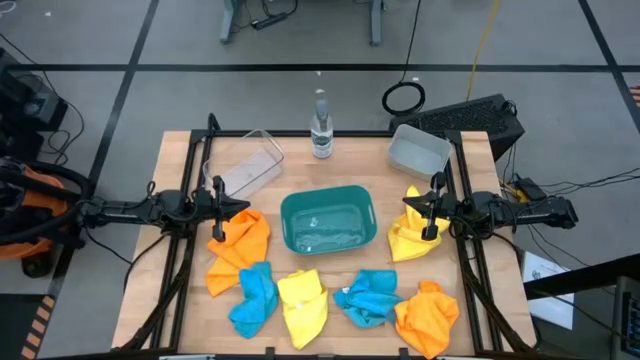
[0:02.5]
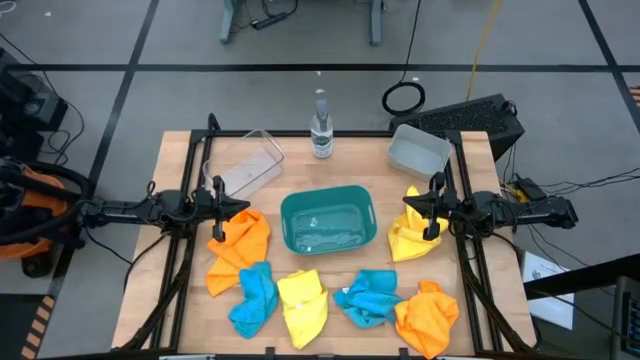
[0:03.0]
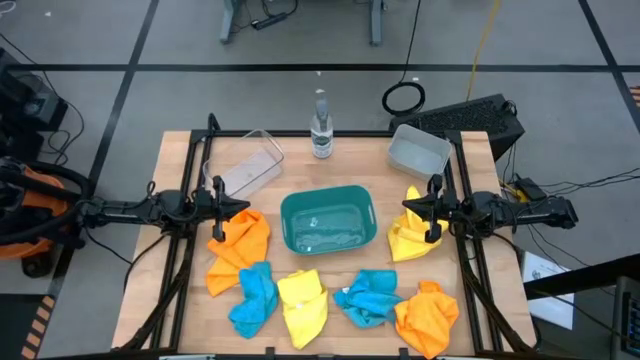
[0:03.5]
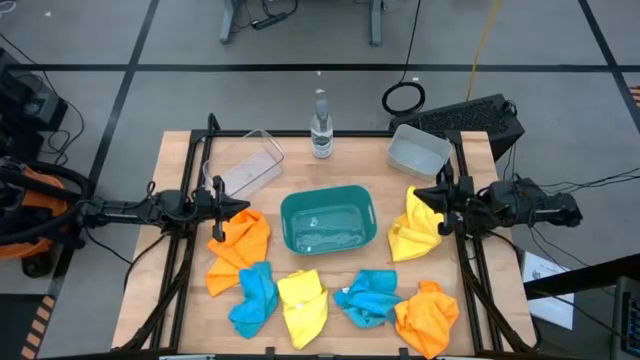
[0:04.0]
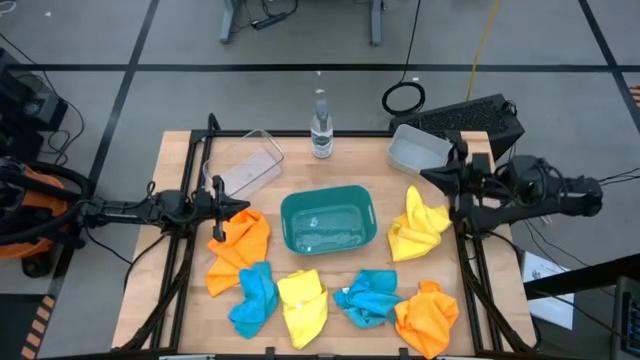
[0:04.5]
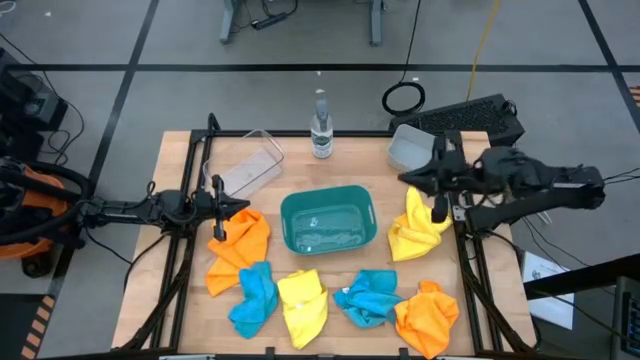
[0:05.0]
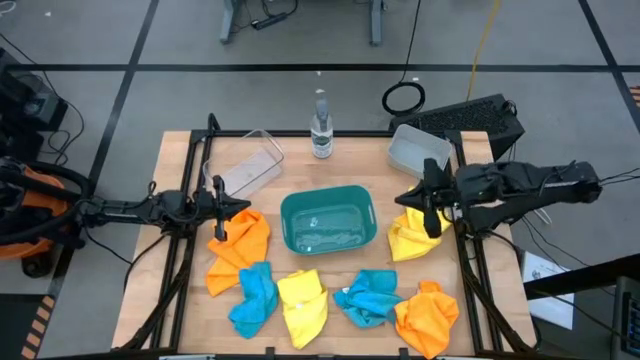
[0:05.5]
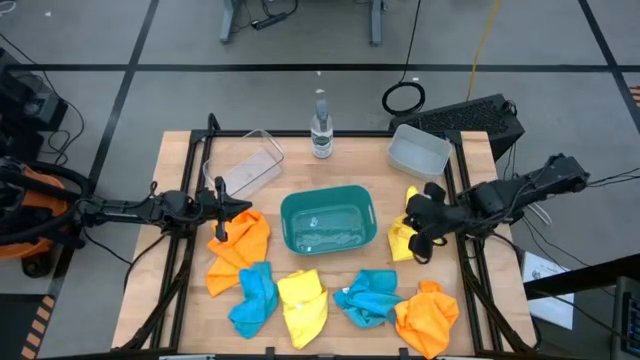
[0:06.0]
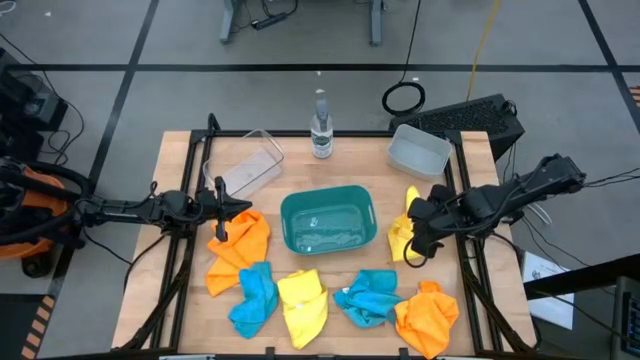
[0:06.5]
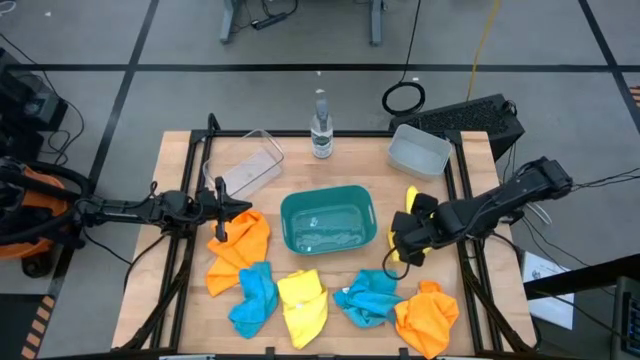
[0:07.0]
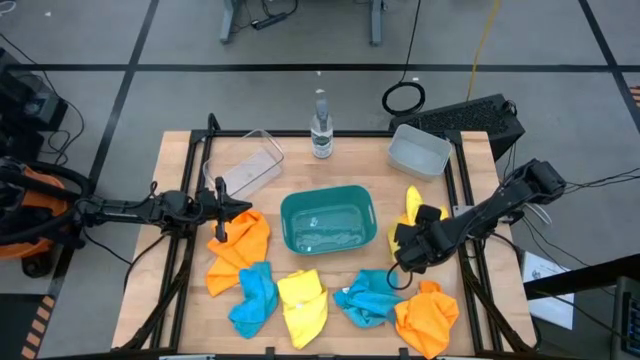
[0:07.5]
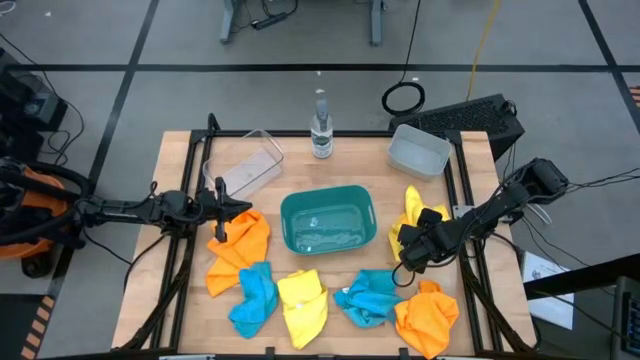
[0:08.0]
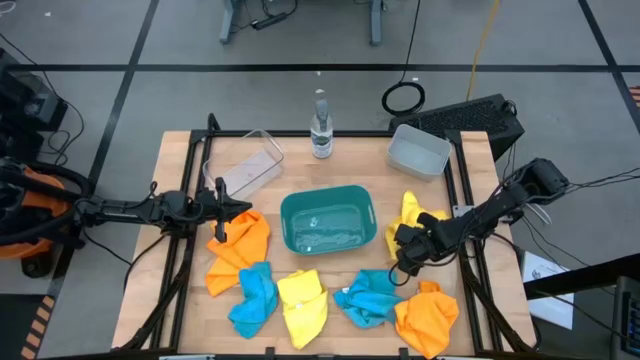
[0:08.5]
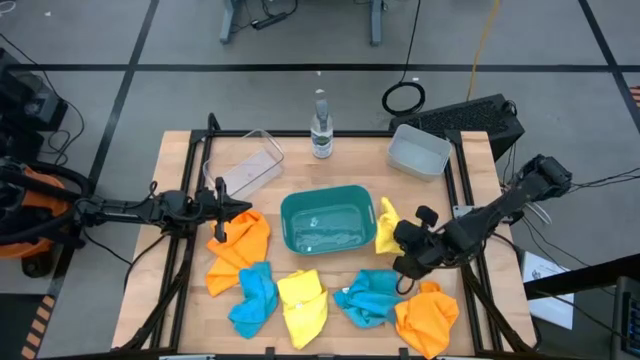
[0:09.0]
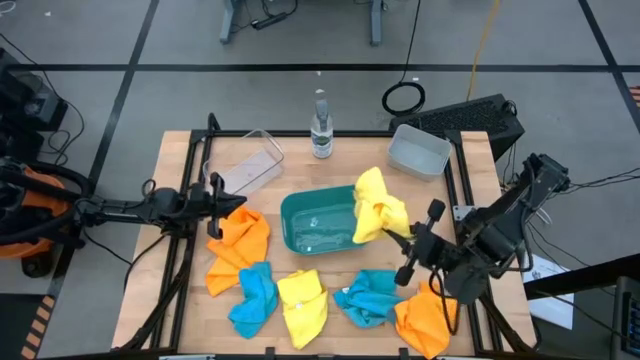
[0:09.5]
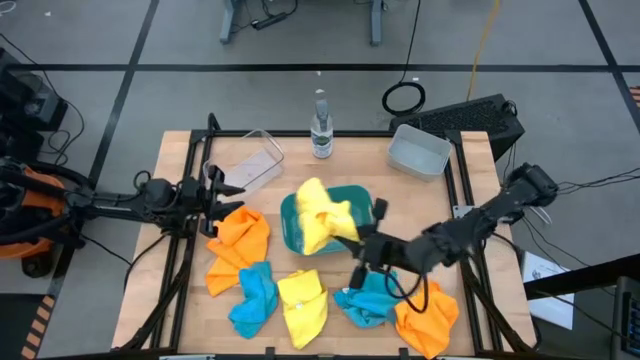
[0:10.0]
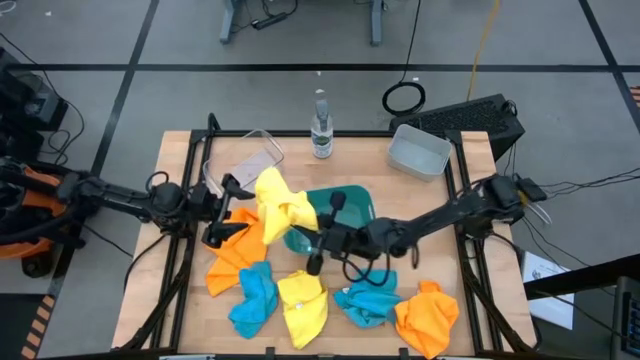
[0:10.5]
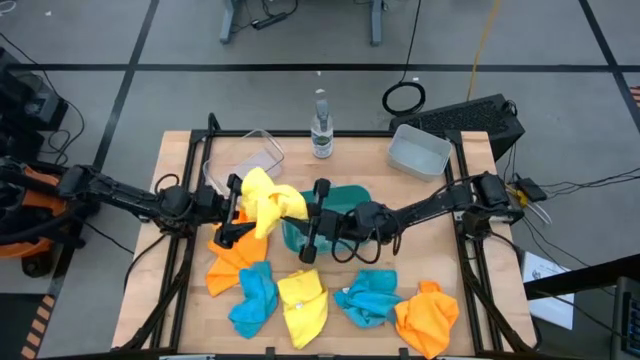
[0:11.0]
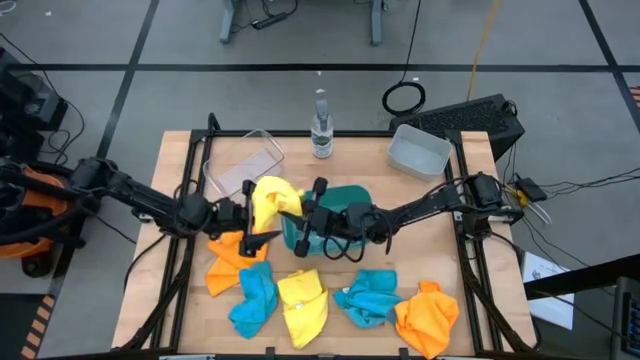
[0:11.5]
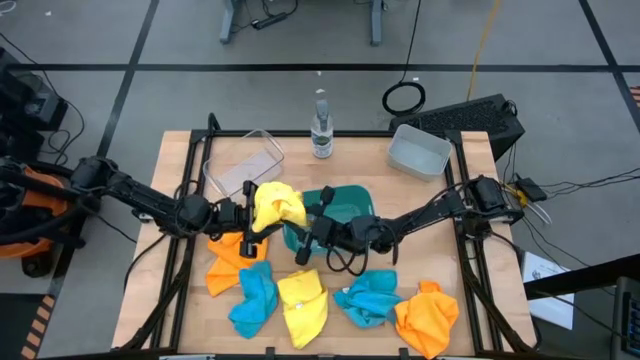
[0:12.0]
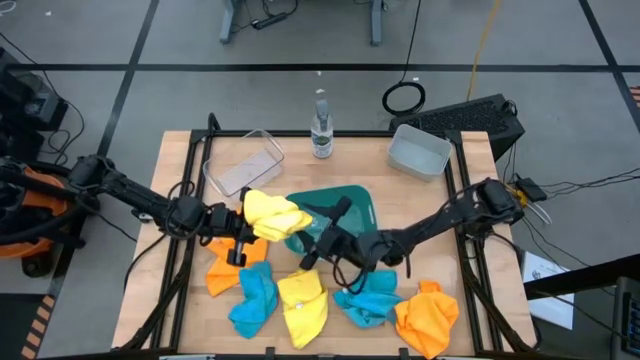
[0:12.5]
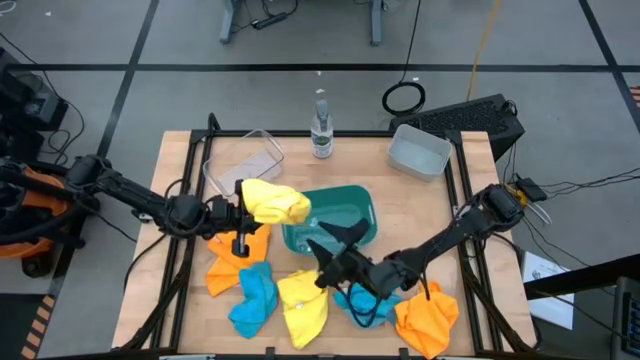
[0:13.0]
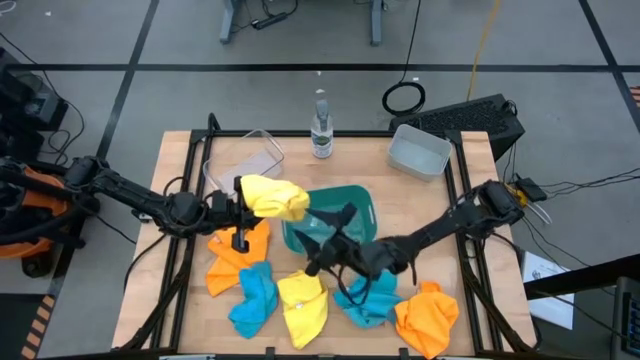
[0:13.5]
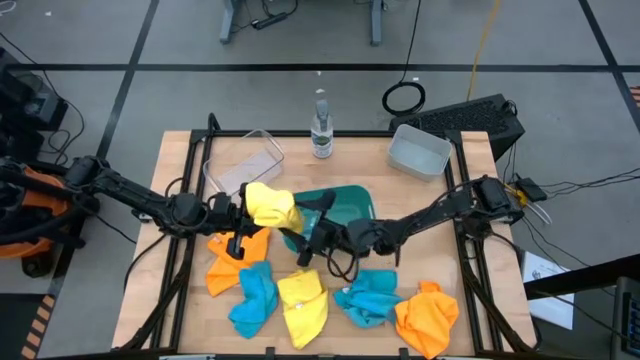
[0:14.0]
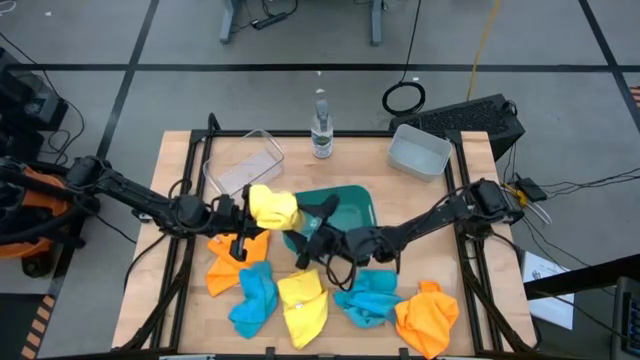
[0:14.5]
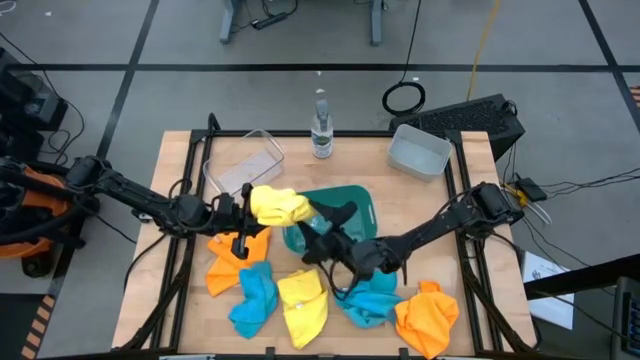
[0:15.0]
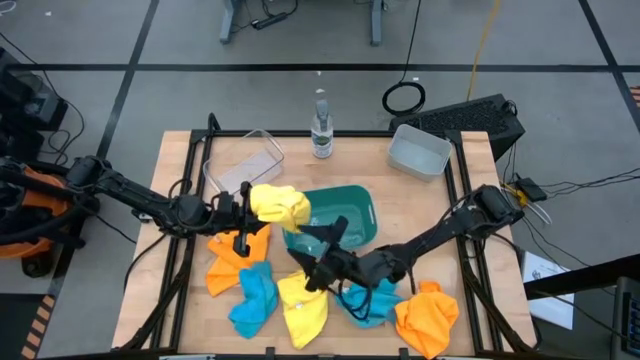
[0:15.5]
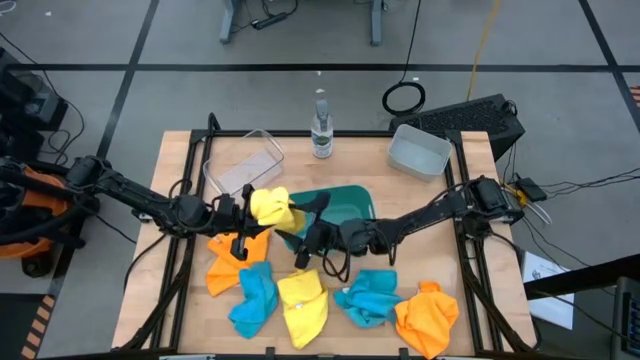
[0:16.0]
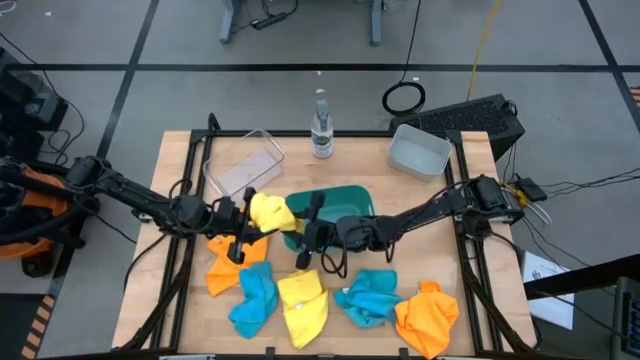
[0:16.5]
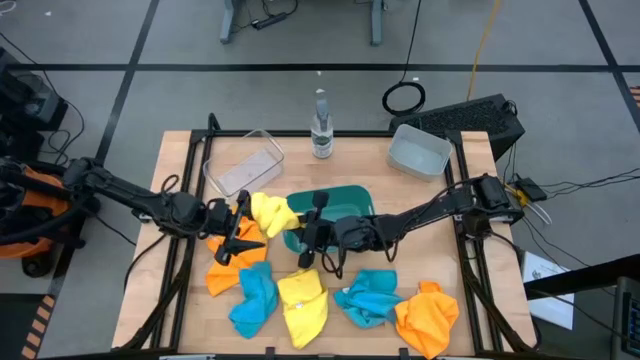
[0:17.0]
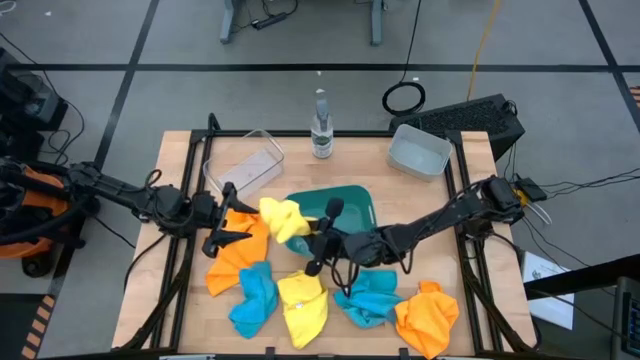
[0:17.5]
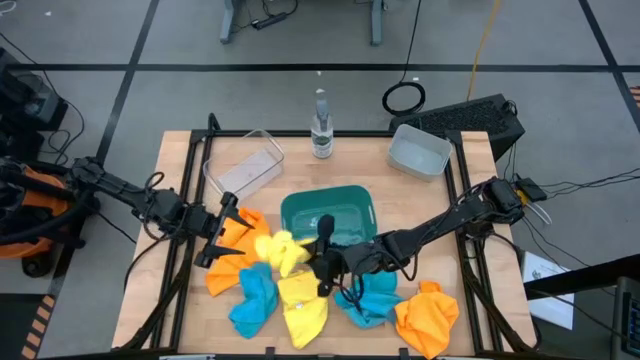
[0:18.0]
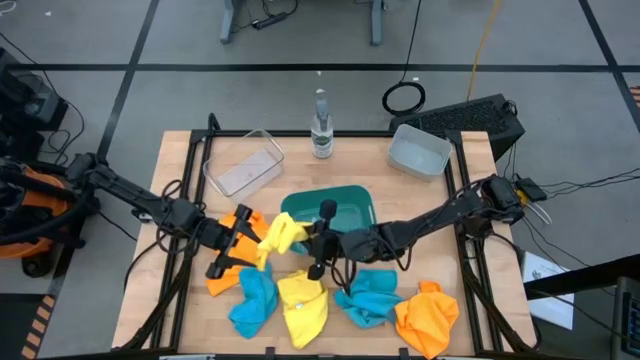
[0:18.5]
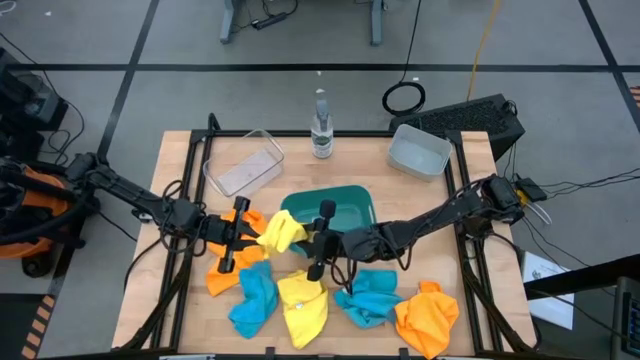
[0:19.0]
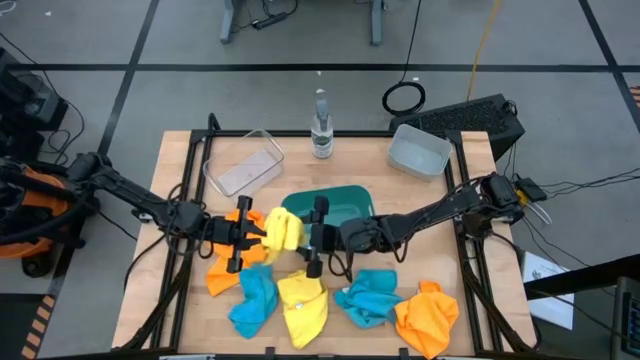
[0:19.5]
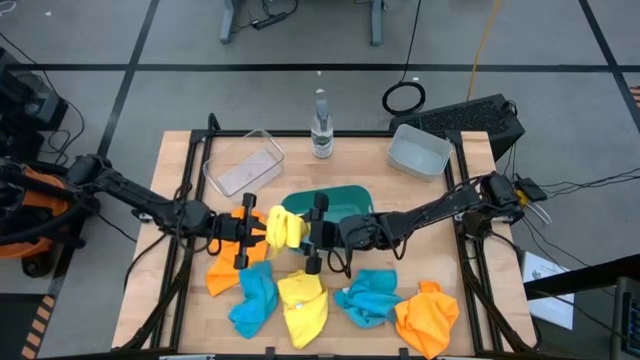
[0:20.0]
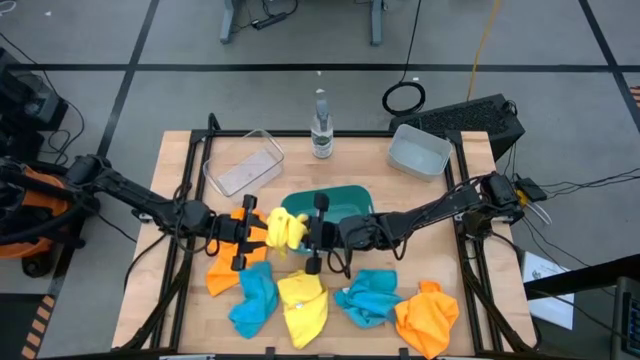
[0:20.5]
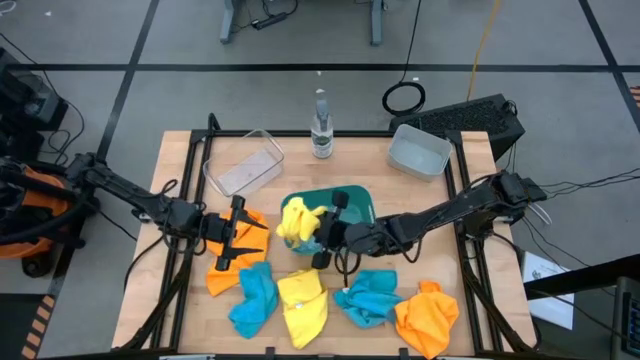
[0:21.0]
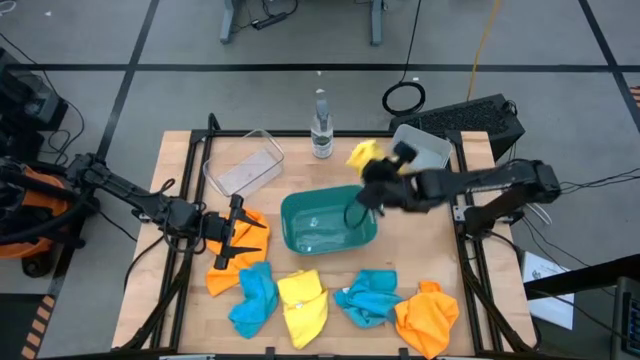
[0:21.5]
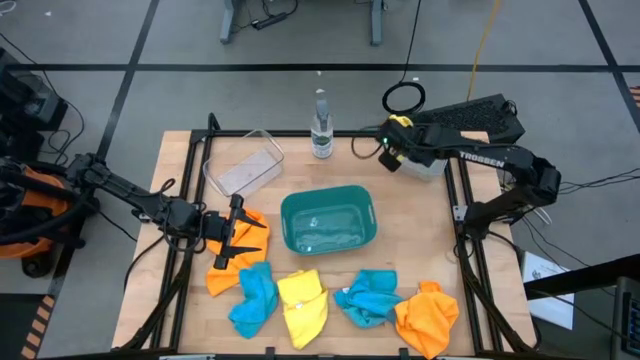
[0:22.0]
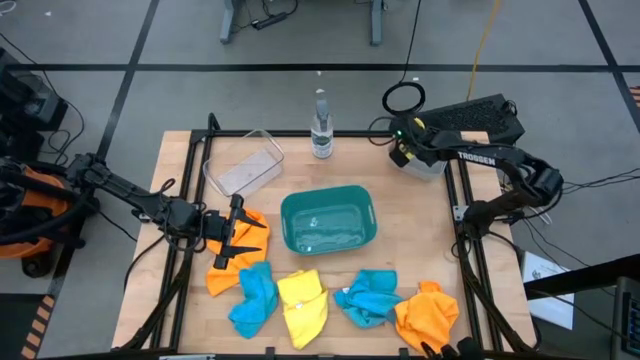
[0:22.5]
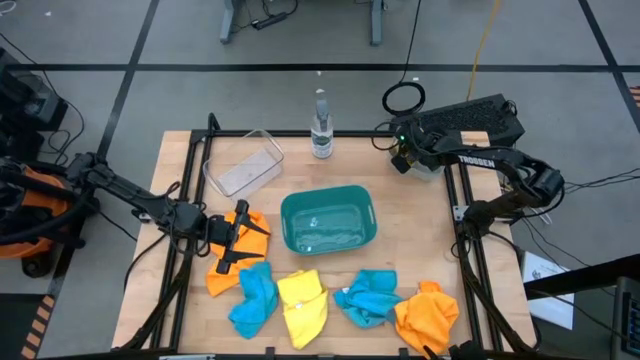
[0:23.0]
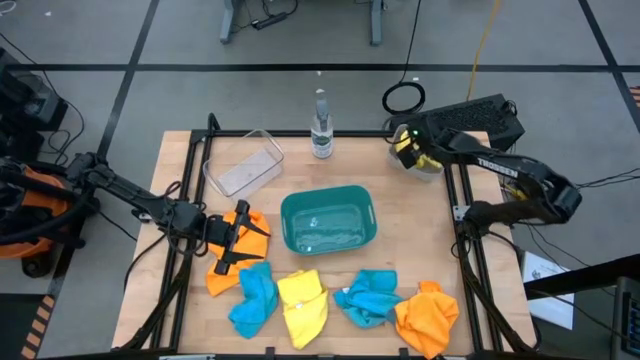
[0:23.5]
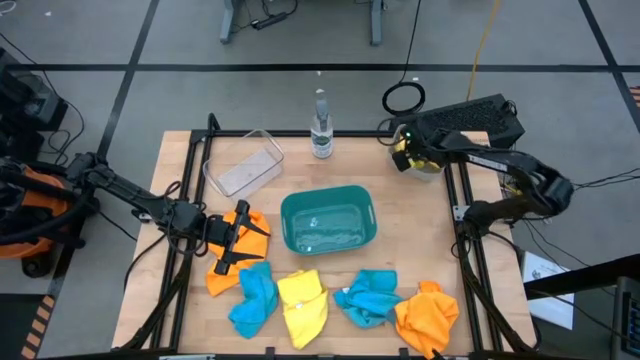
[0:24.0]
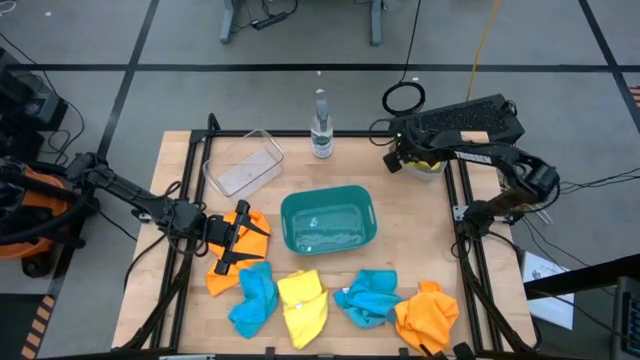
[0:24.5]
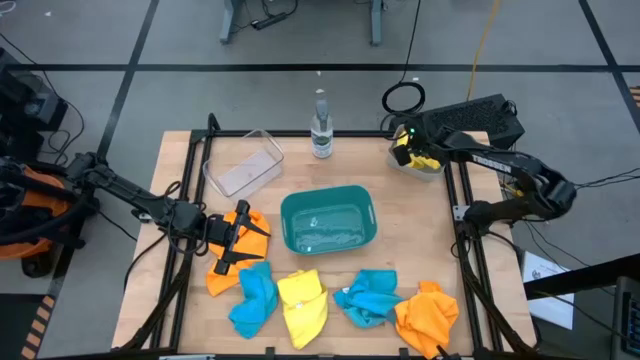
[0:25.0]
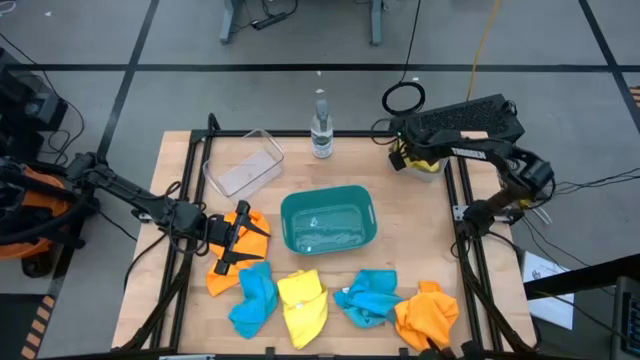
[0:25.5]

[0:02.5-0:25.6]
Task: Sort microfiber towel by color & place in baskets
Put the top yellow towel into the gray bin
